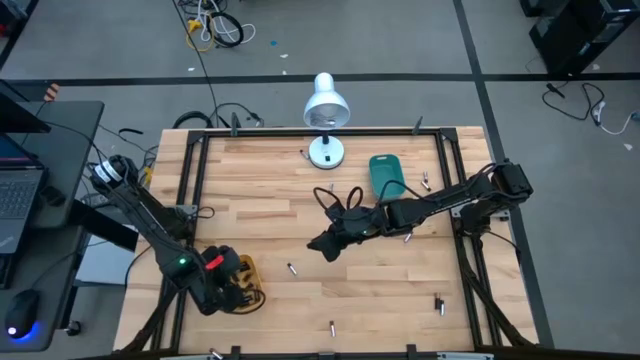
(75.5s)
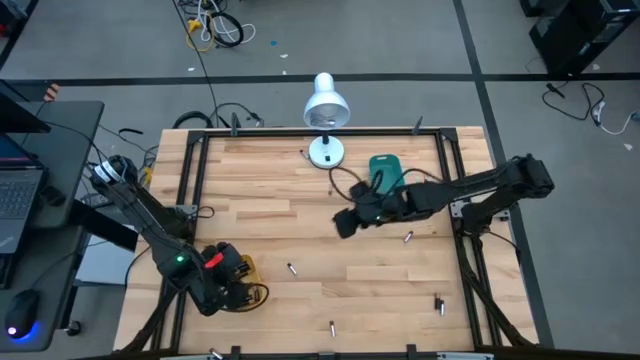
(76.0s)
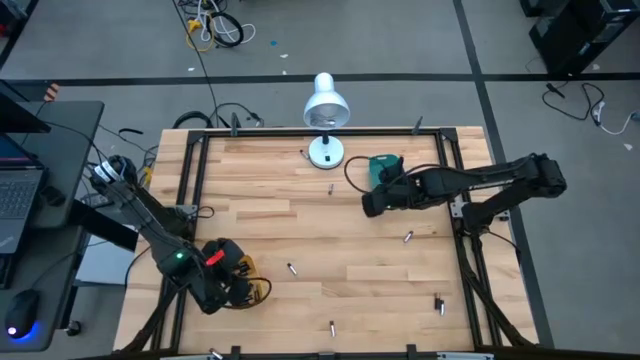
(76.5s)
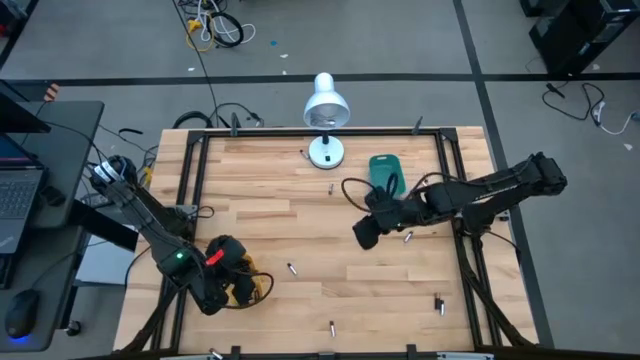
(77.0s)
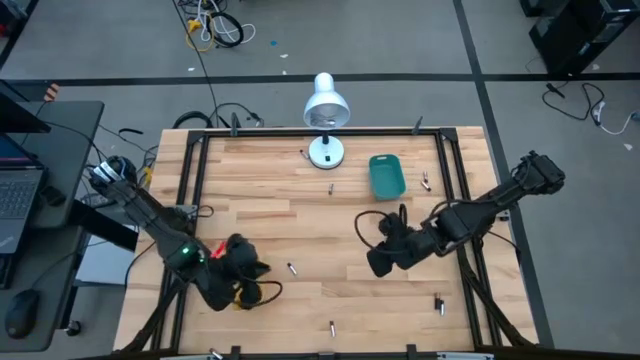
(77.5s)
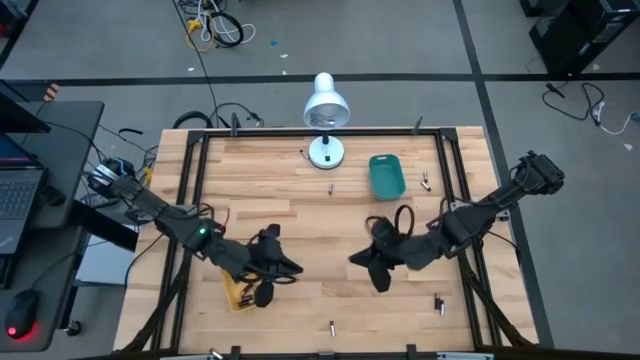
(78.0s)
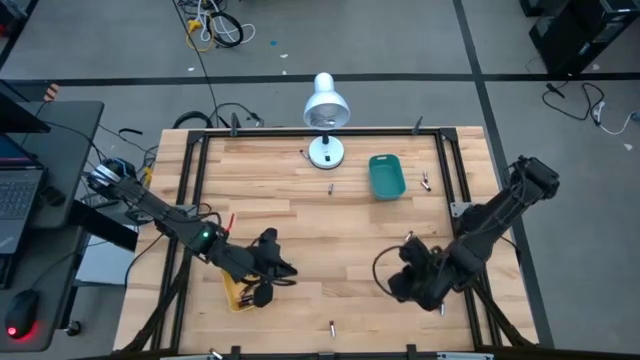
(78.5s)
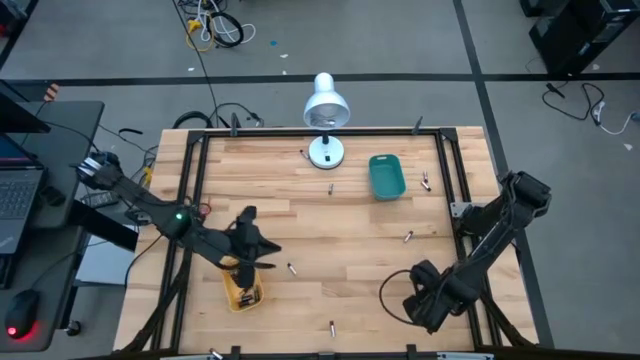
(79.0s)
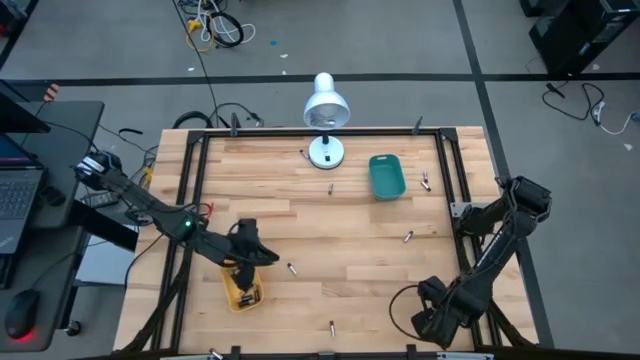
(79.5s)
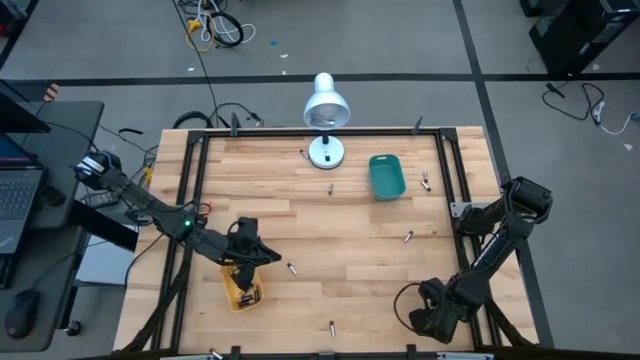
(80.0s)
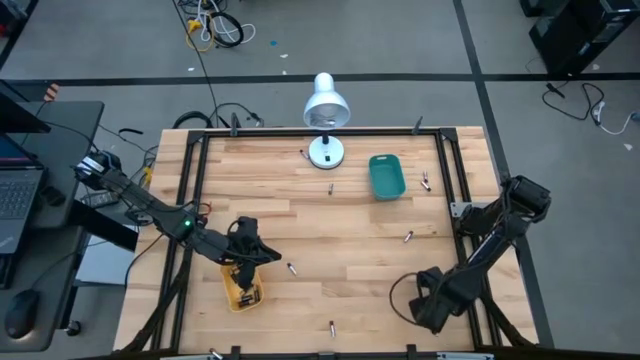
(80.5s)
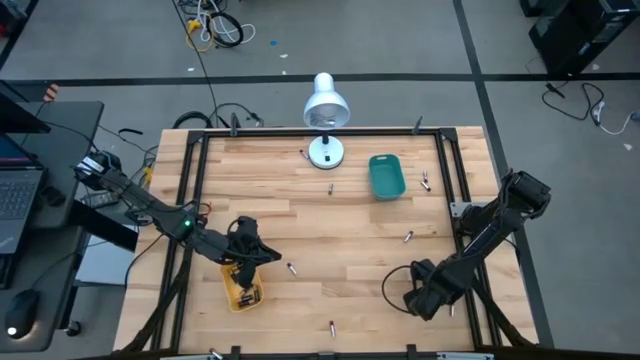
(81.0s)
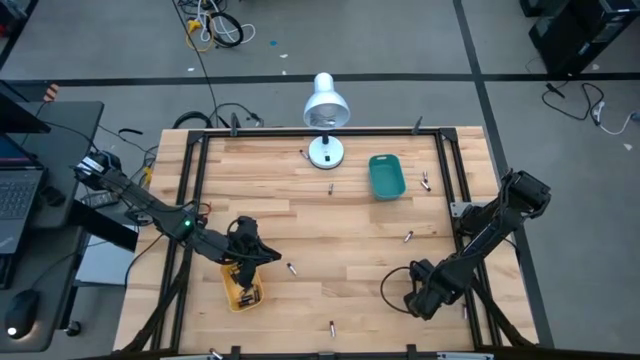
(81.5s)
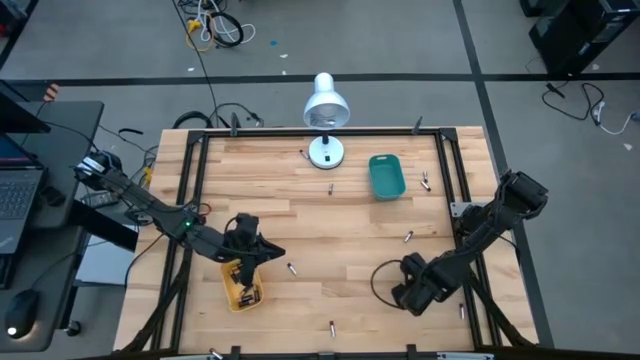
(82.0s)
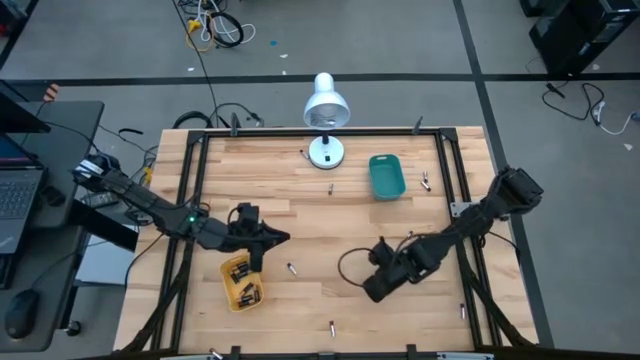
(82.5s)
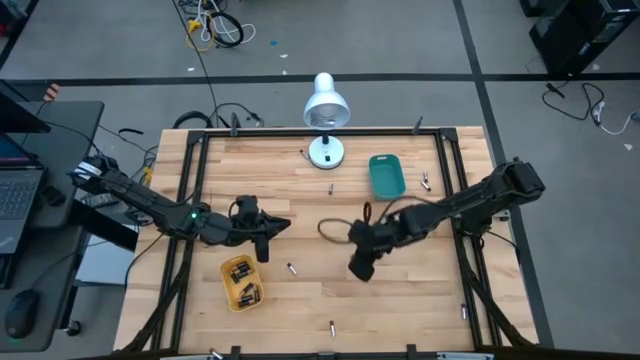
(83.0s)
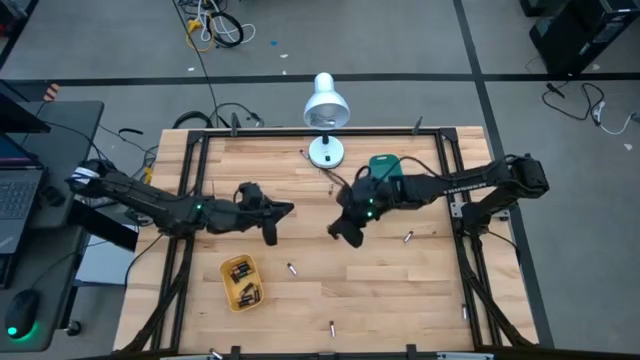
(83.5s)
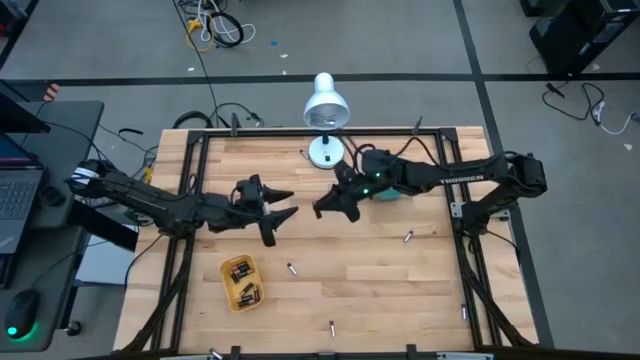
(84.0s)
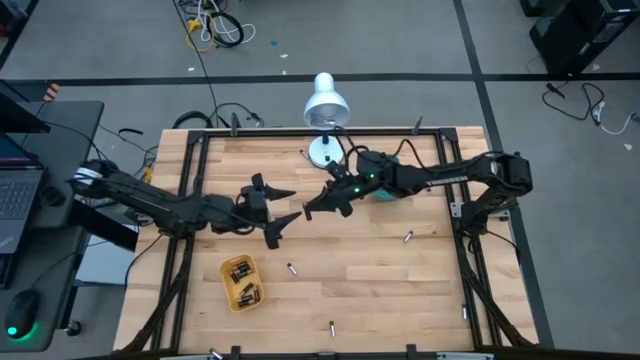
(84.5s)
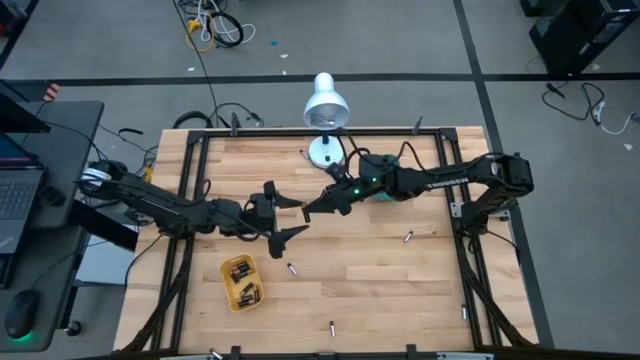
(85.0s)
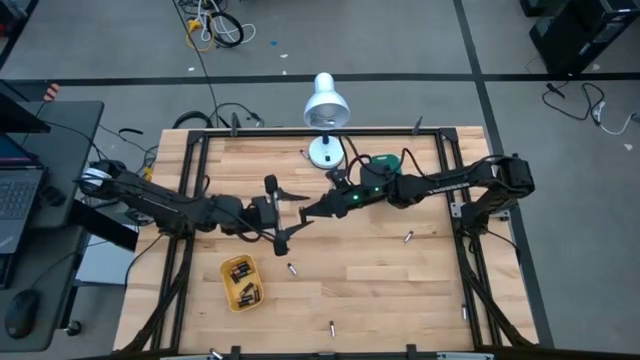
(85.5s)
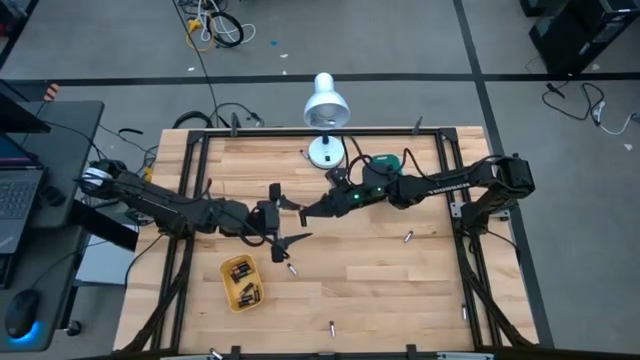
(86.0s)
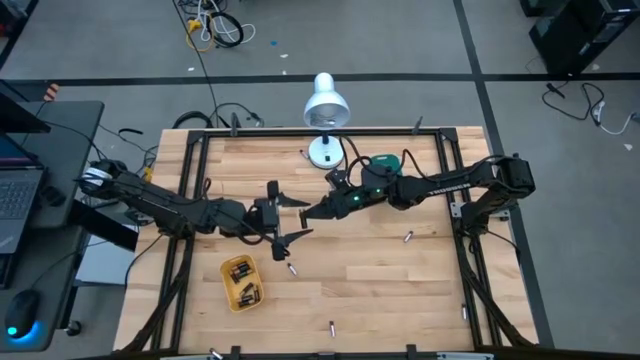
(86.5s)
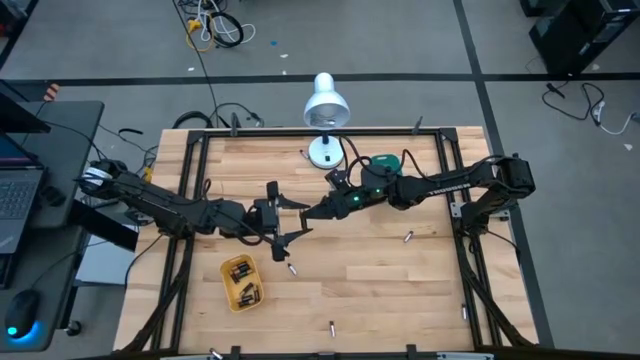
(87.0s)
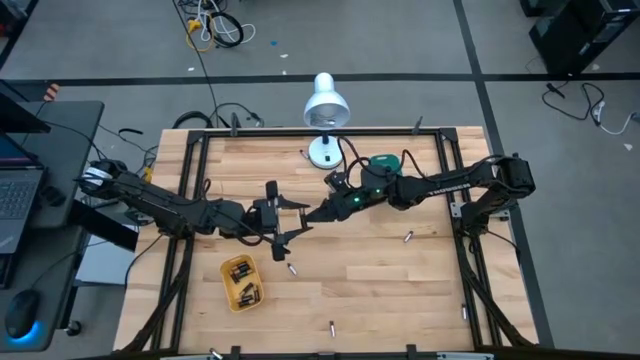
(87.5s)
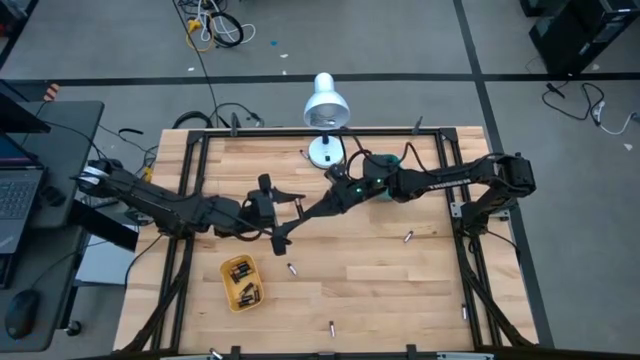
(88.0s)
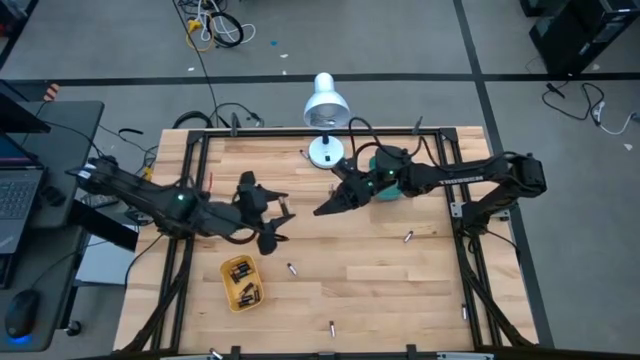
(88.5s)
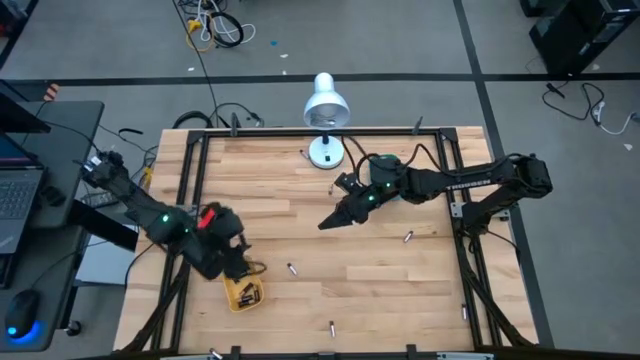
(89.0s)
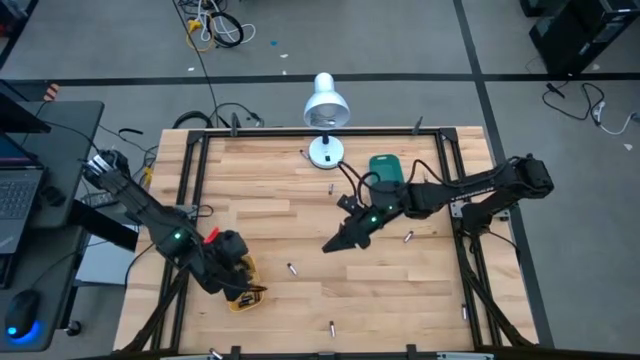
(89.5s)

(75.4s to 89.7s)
Task: Sort batteries
Put the golden battery into the yellow bin

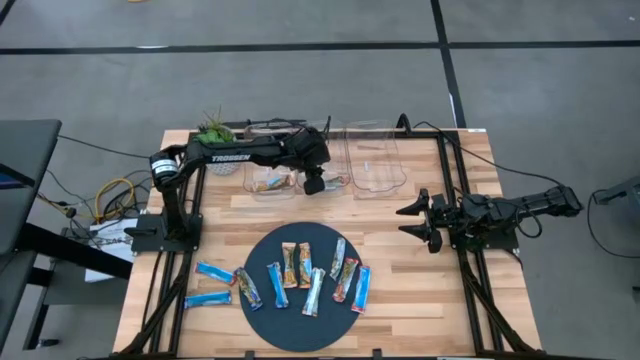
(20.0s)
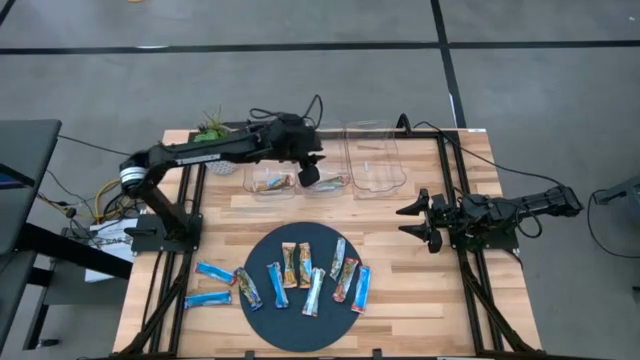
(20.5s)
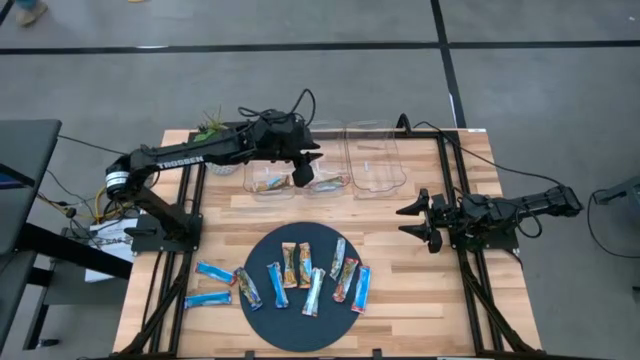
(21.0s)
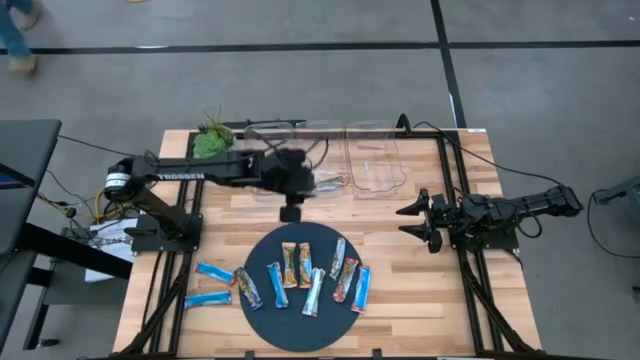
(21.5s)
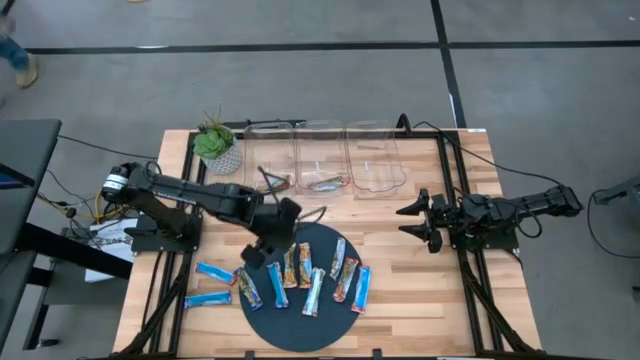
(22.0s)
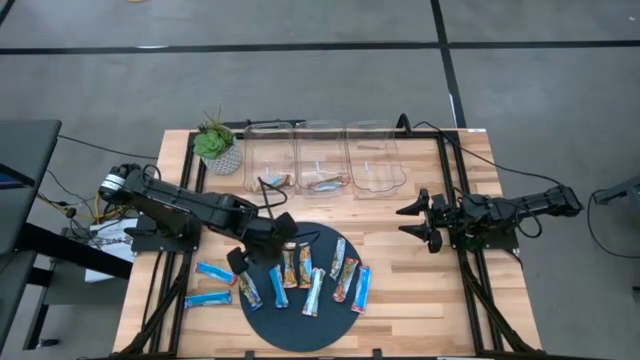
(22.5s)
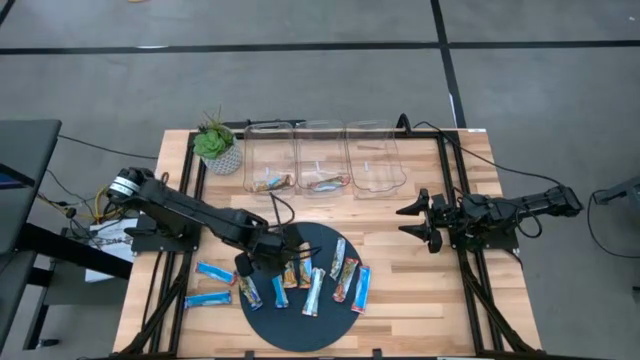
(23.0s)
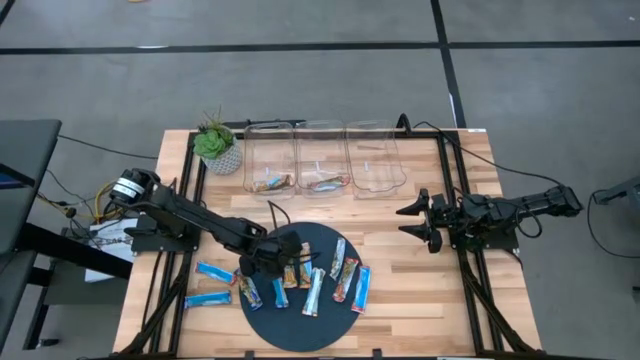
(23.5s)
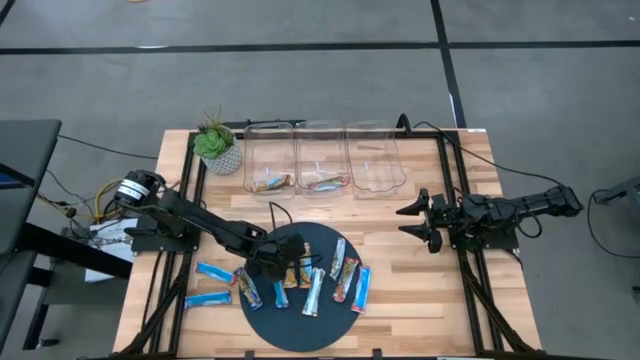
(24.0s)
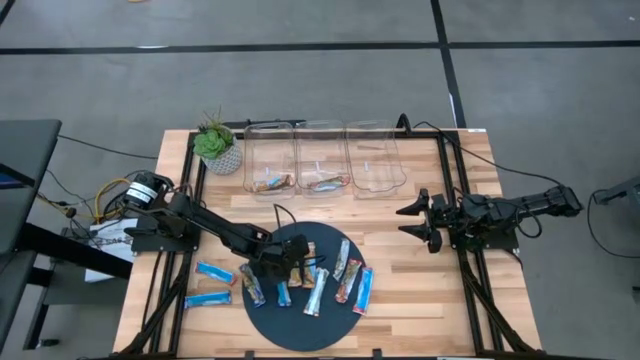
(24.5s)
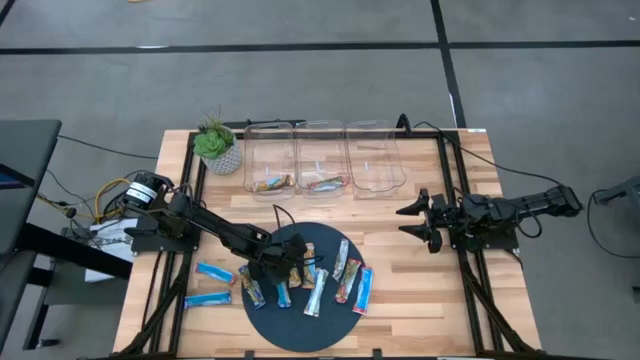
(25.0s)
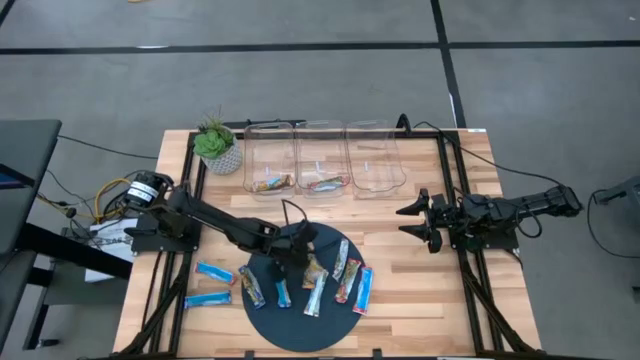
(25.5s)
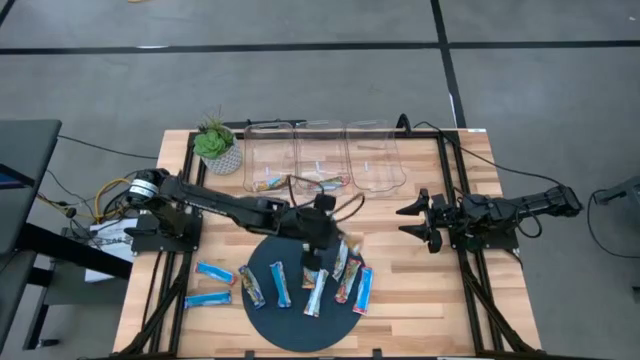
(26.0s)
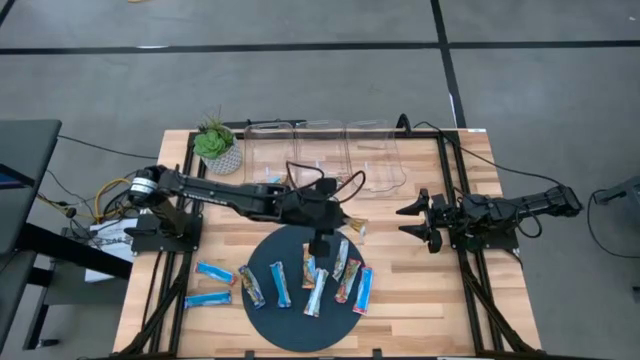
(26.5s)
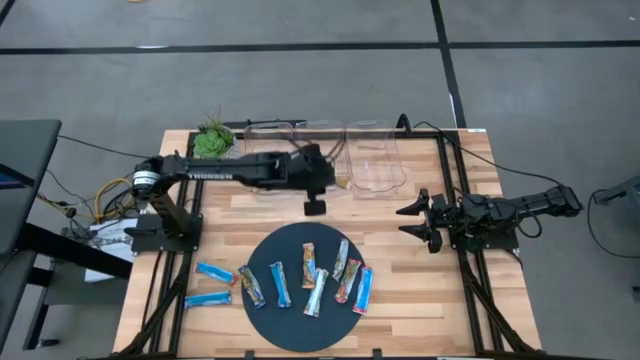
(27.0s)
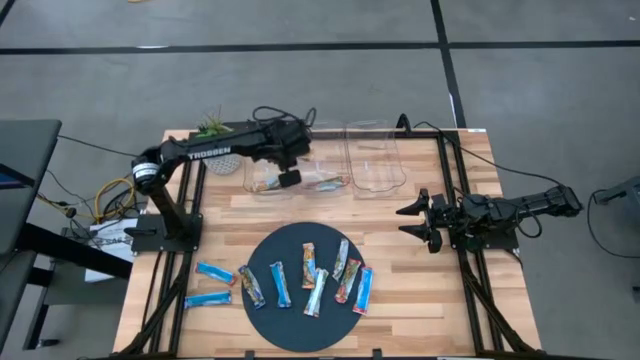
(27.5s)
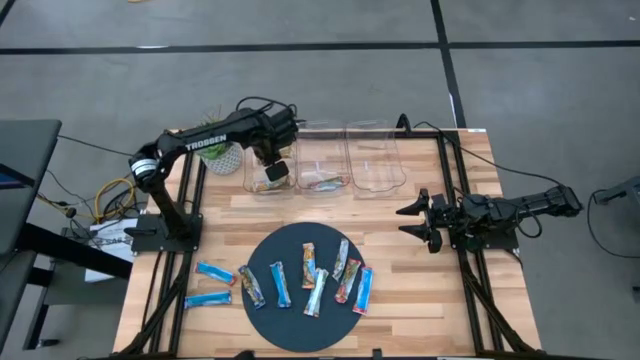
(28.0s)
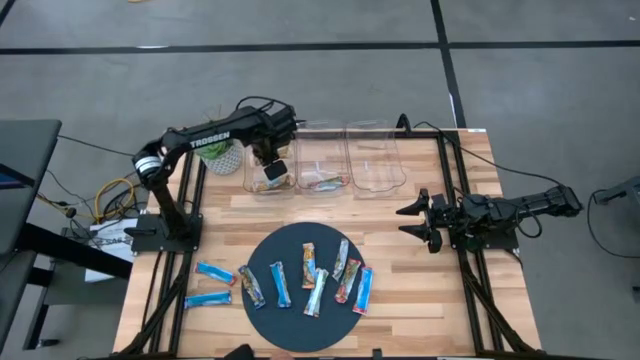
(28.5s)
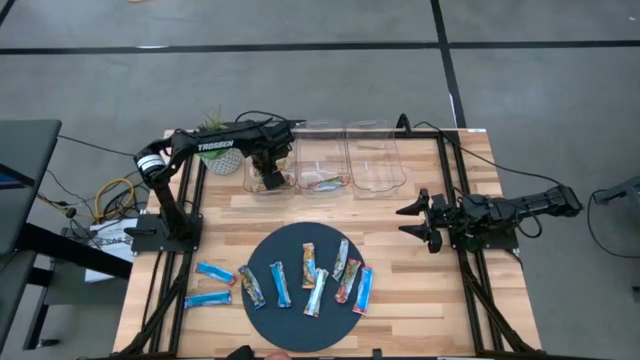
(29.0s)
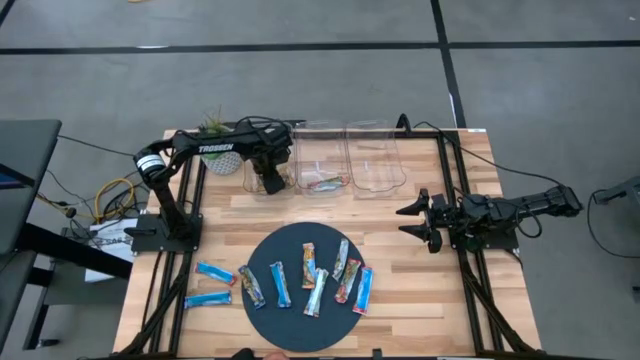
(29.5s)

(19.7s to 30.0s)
Task: Pick and place Granola Bars by type
Put the orange bar into the left transparent bin
